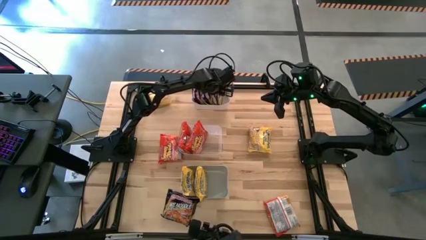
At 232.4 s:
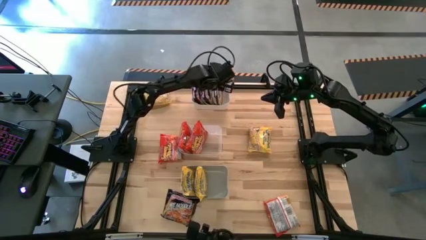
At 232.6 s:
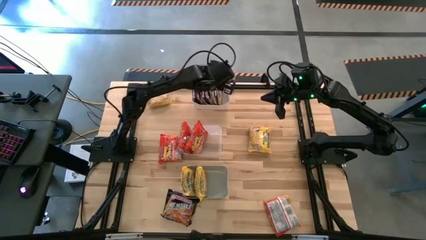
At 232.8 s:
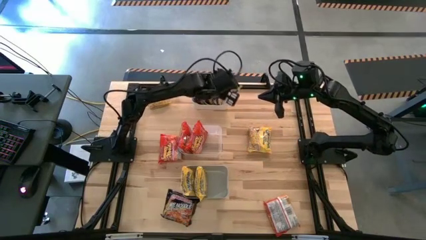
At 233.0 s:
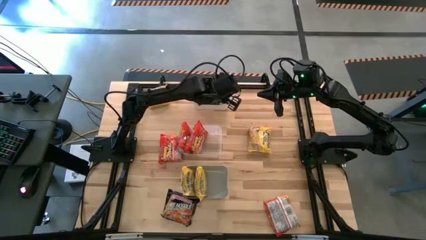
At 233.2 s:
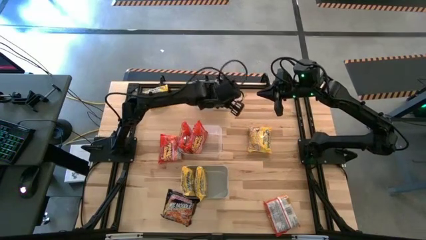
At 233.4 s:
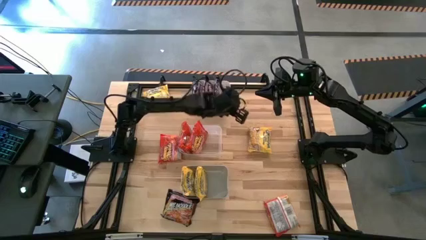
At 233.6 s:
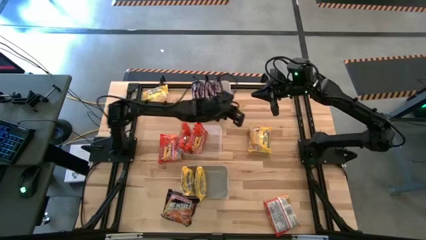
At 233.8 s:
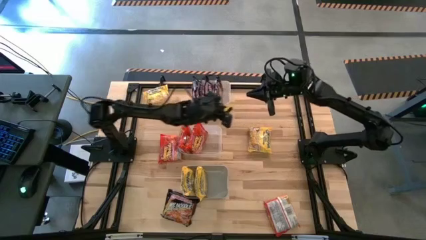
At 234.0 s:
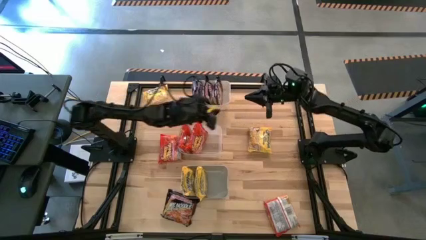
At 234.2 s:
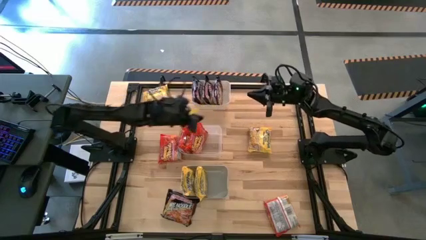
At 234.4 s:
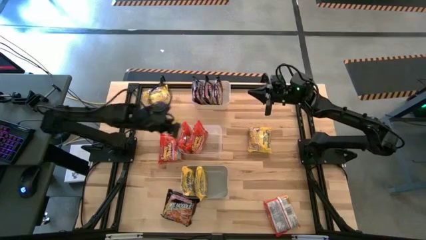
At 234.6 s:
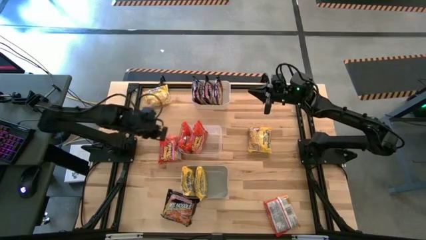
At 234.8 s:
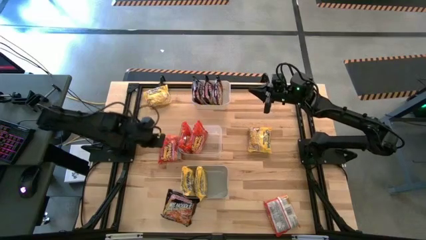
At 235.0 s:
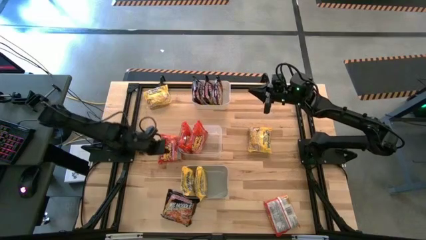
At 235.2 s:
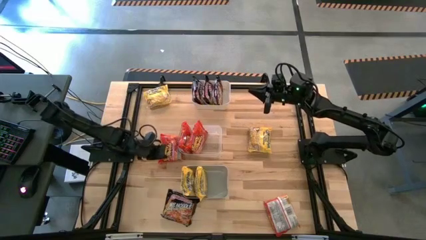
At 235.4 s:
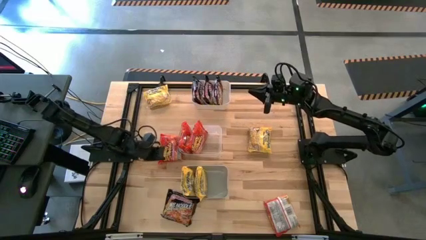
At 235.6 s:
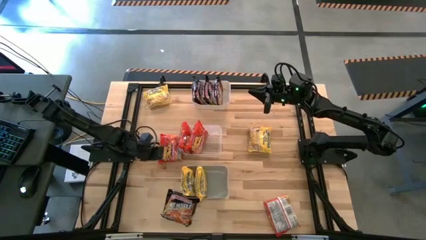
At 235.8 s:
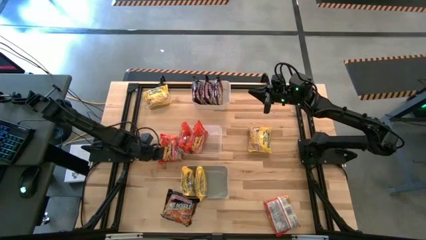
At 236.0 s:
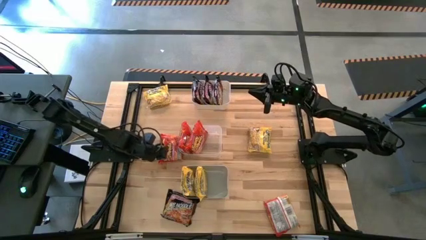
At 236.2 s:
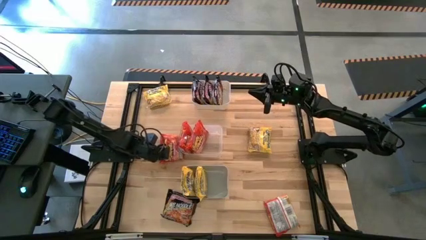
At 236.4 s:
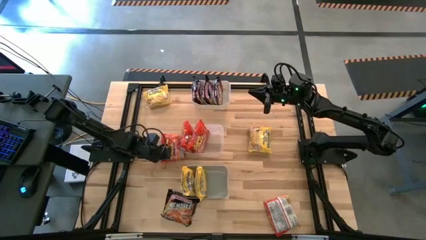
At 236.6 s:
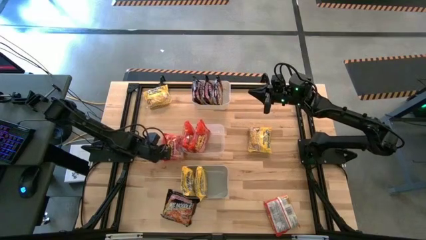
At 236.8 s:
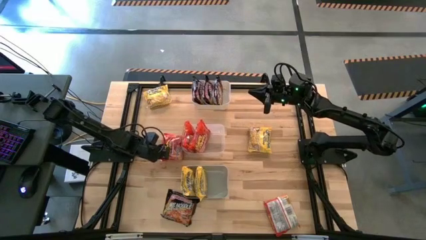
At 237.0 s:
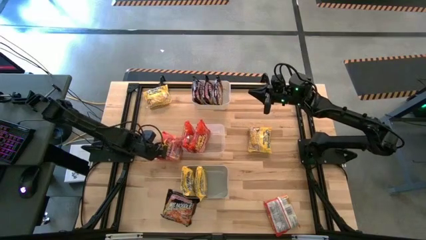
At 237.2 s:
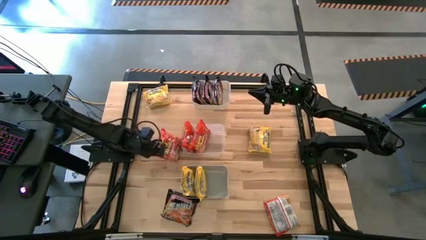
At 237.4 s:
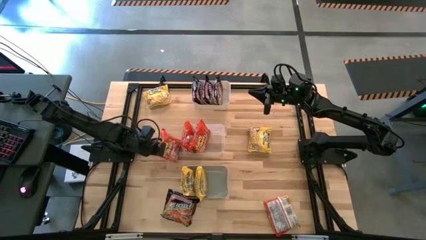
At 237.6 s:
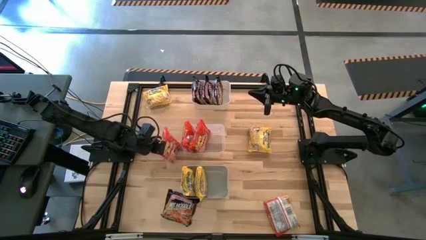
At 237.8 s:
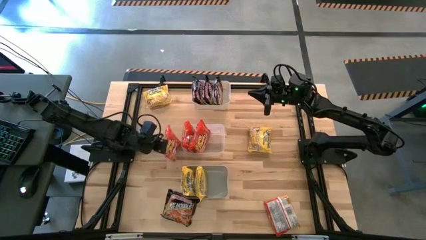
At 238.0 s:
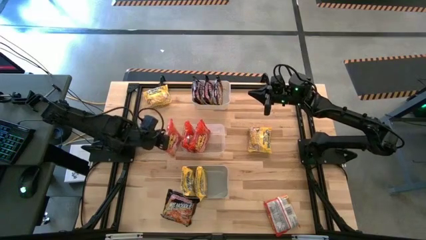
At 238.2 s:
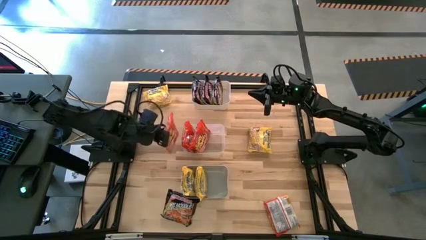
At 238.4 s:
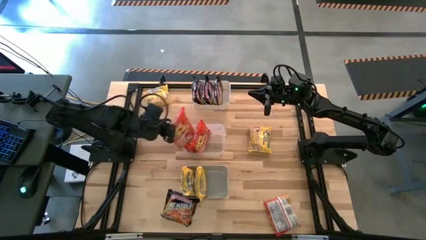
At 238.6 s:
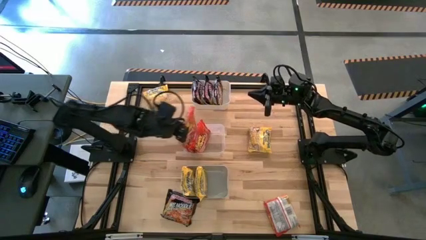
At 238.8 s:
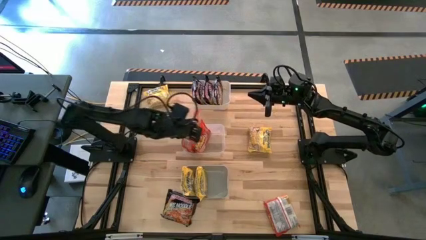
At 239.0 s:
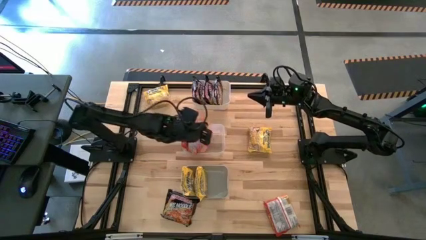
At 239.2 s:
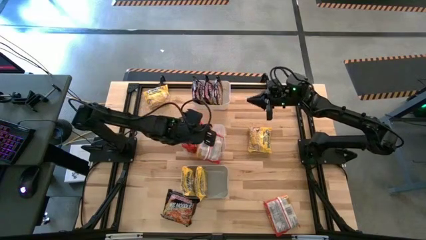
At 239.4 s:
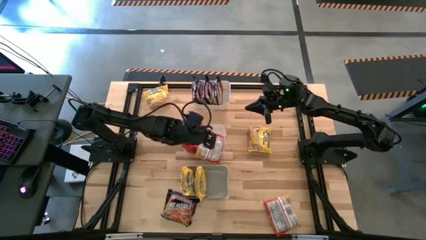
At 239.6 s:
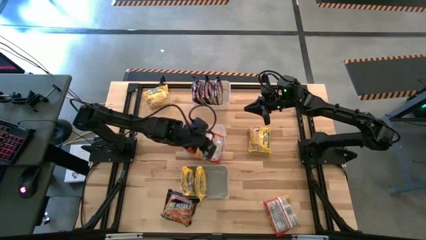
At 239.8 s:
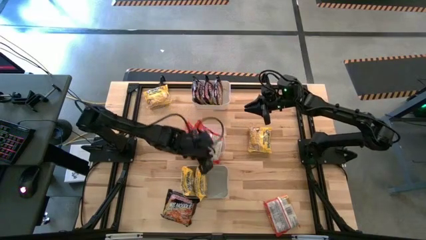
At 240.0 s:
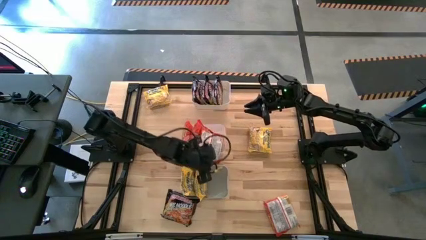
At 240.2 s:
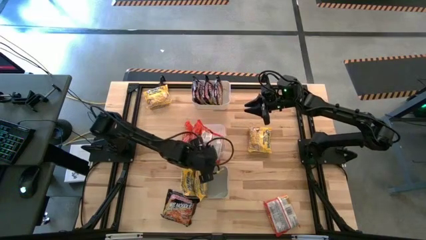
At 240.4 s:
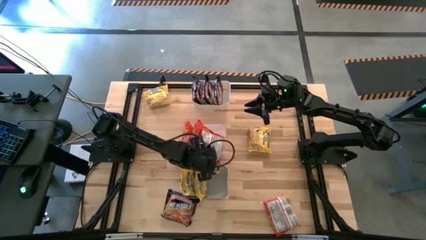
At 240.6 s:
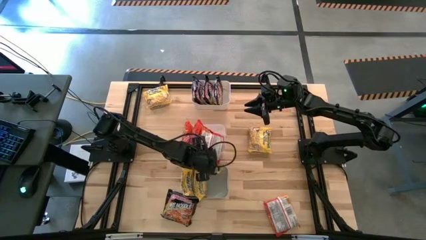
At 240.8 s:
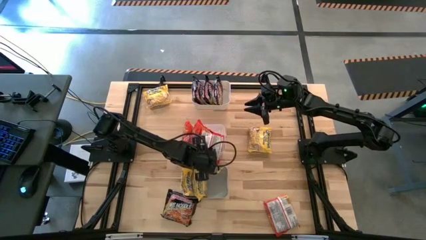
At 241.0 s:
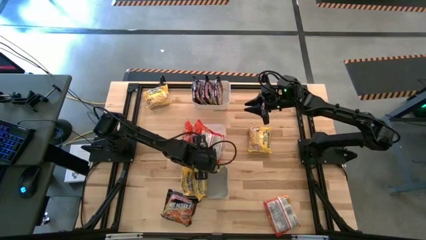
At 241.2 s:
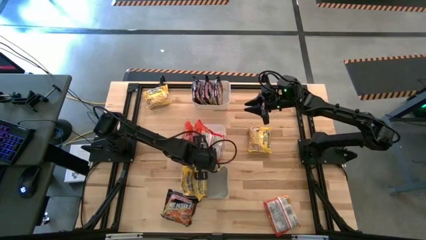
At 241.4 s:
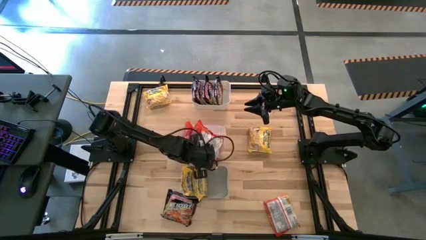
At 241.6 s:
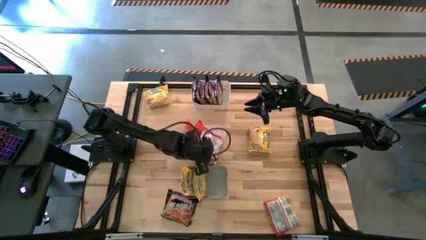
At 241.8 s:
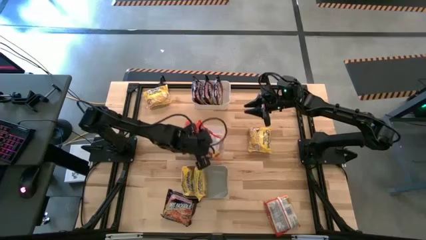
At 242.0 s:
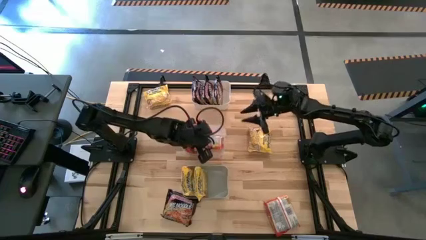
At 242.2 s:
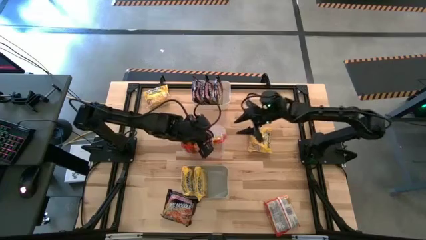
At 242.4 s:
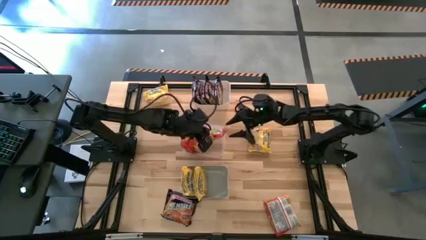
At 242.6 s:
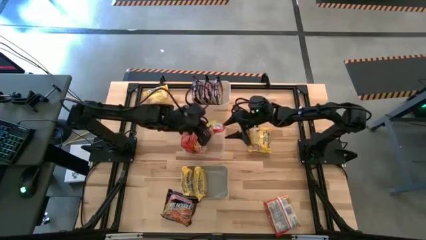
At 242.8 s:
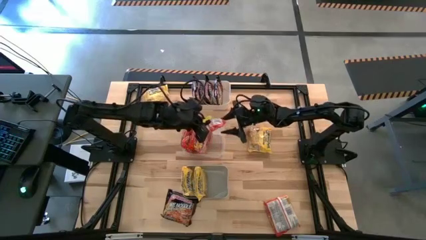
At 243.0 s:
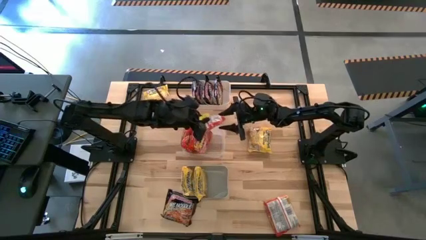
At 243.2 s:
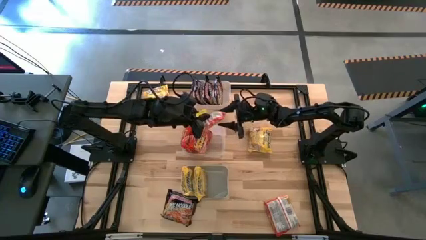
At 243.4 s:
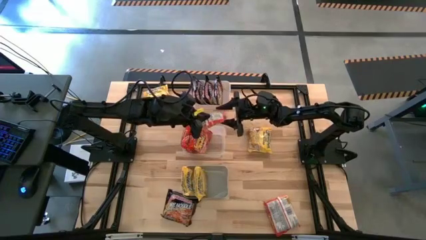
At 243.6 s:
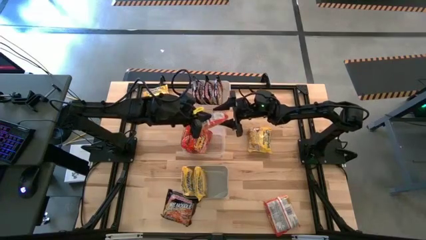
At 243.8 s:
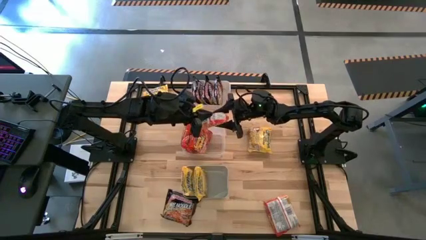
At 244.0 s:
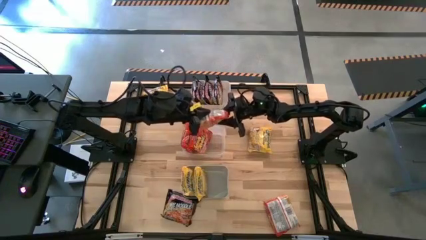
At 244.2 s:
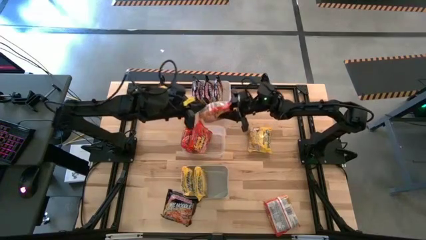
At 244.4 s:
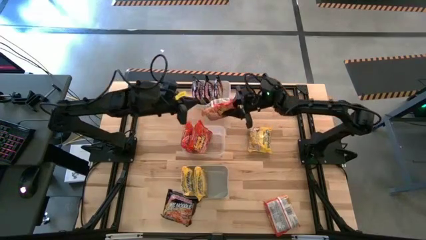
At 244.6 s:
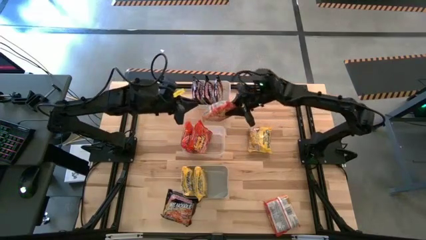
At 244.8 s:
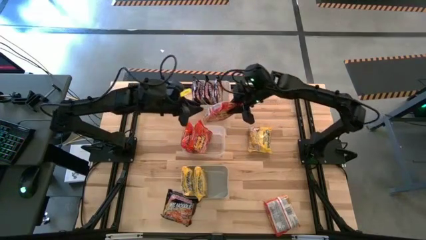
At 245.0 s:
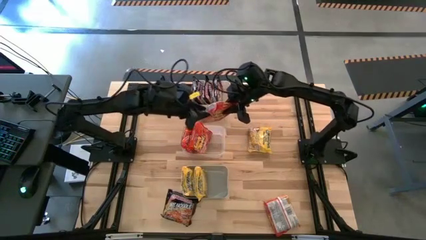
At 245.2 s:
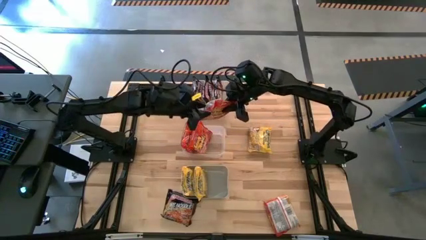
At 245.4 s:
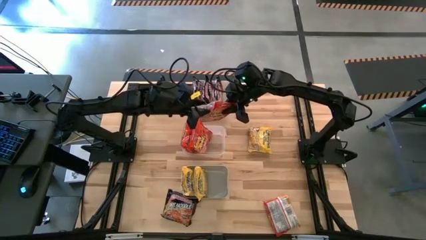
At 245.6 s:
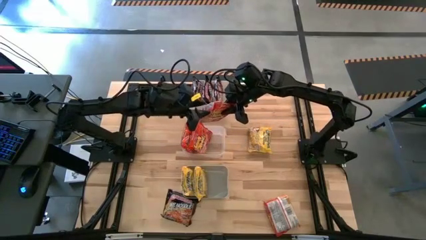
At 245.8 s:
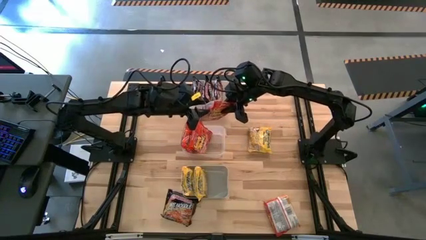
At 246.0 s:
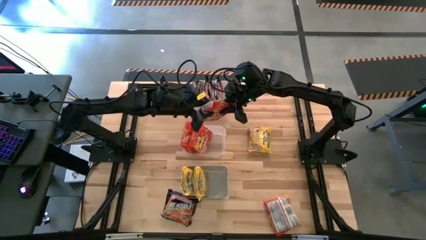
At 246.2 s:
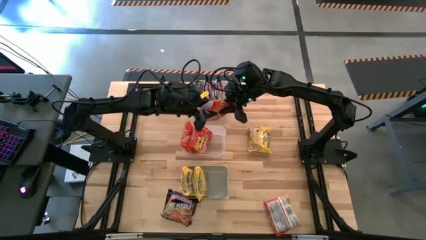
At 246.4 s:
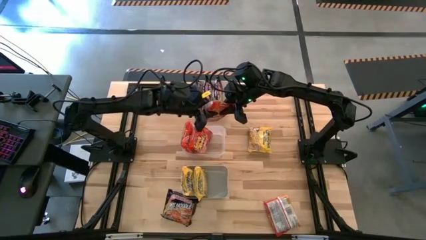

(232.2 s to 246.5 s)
Task: Sort Maruchan noodles
Put the orange noodle pack into the transparent bin
